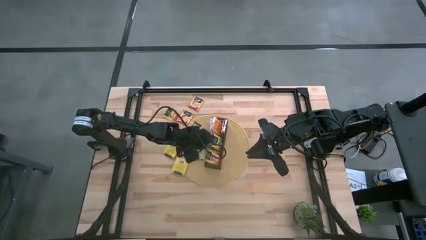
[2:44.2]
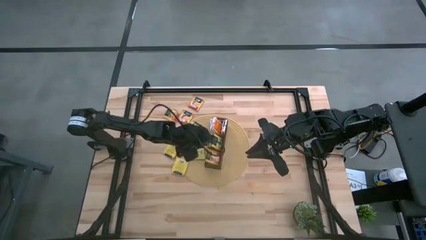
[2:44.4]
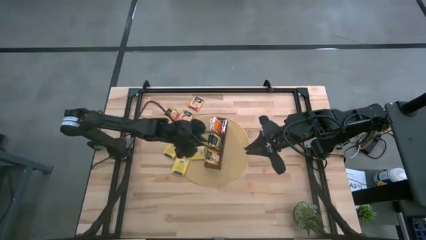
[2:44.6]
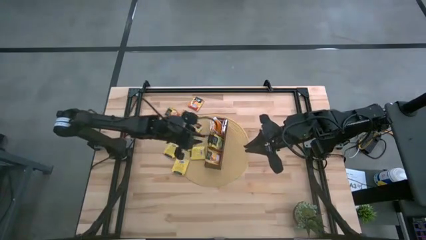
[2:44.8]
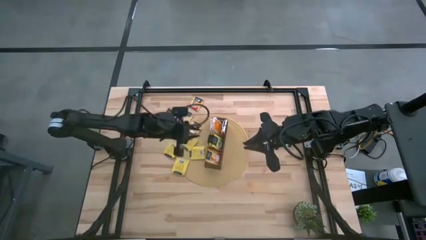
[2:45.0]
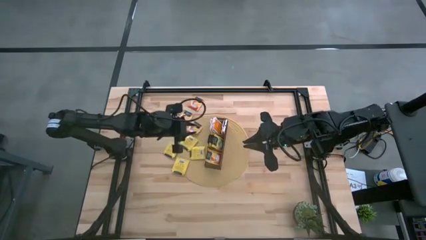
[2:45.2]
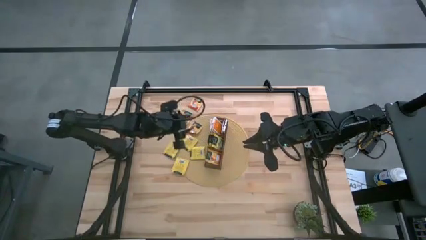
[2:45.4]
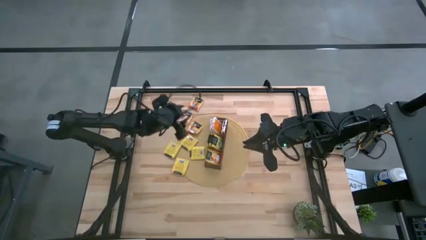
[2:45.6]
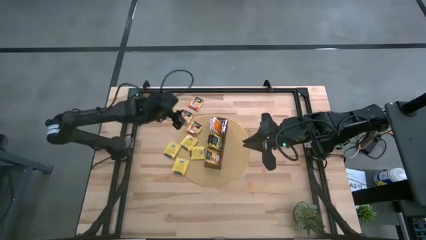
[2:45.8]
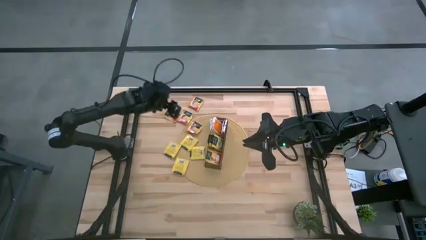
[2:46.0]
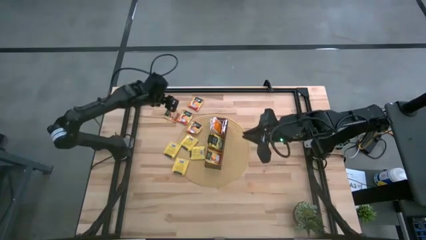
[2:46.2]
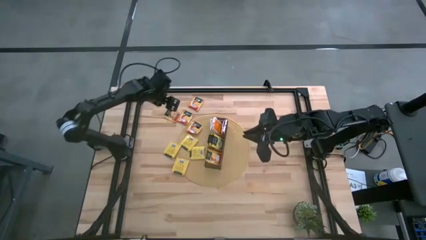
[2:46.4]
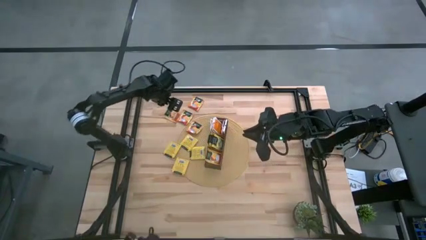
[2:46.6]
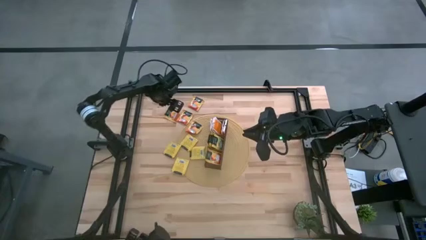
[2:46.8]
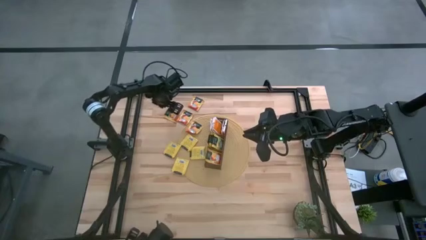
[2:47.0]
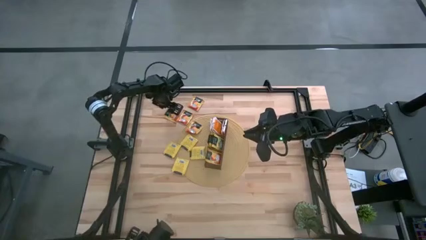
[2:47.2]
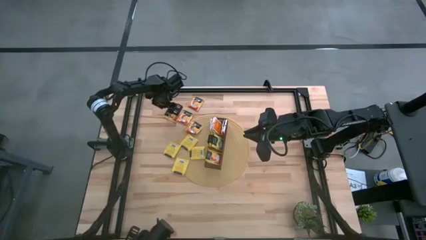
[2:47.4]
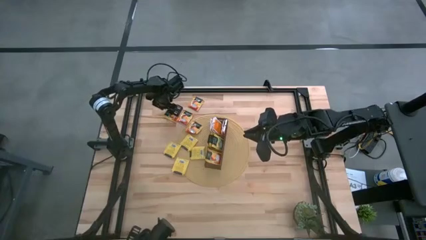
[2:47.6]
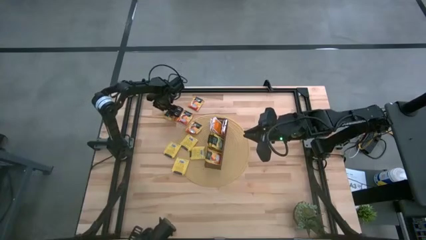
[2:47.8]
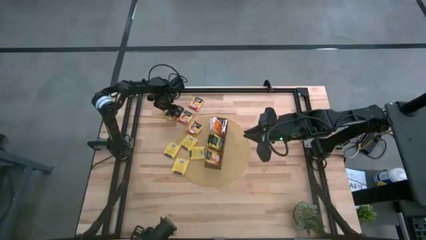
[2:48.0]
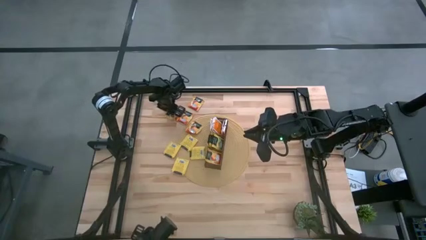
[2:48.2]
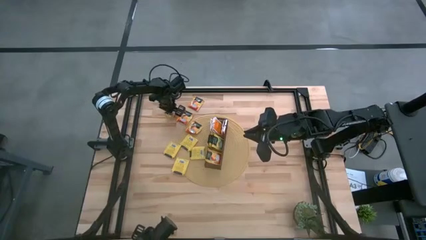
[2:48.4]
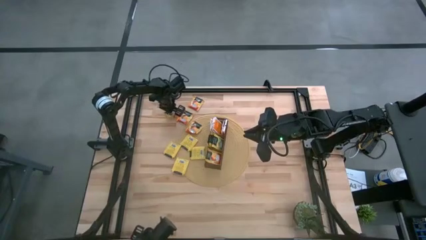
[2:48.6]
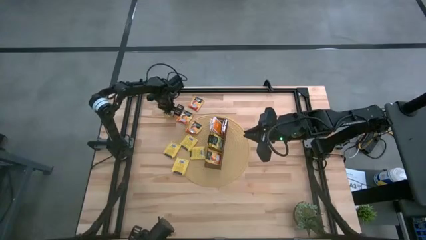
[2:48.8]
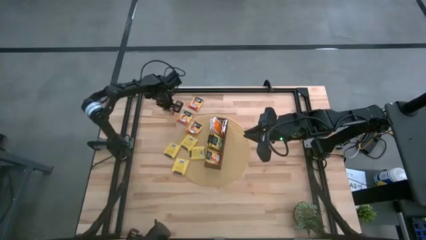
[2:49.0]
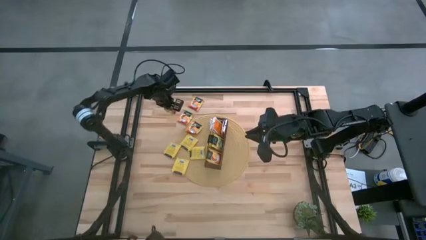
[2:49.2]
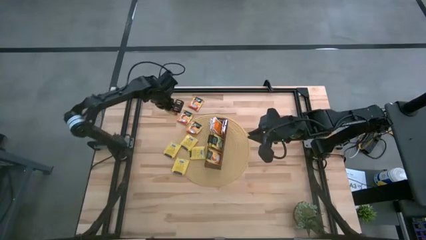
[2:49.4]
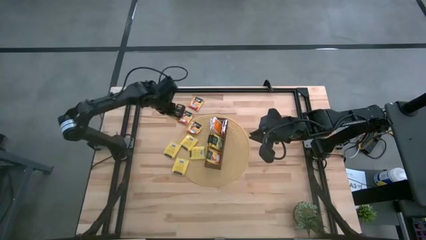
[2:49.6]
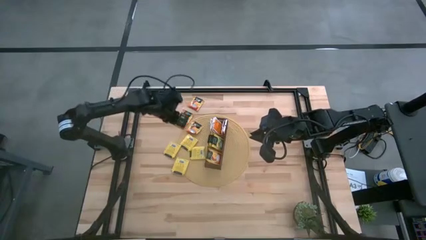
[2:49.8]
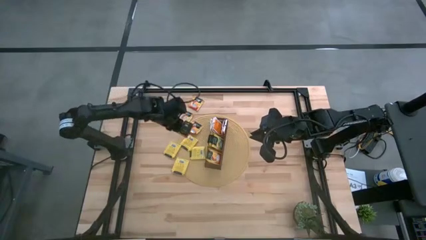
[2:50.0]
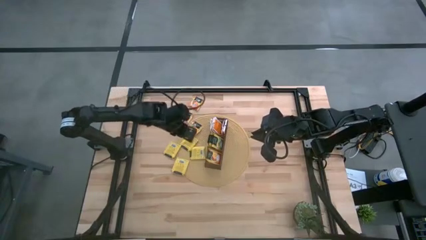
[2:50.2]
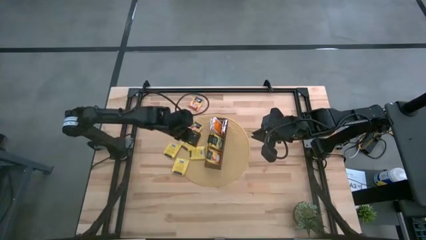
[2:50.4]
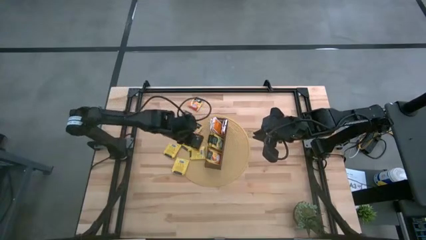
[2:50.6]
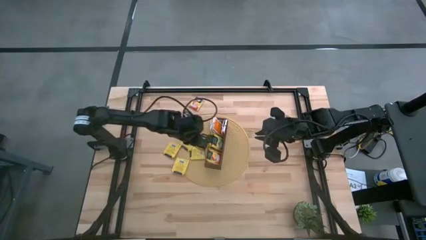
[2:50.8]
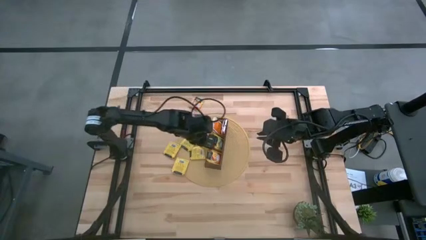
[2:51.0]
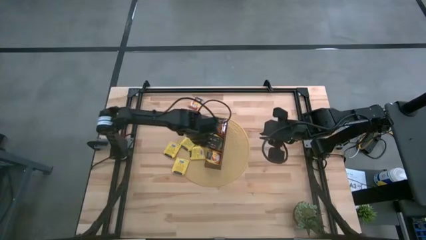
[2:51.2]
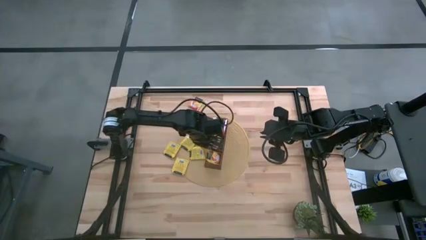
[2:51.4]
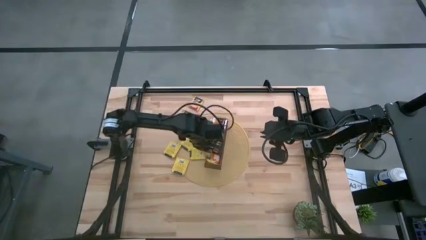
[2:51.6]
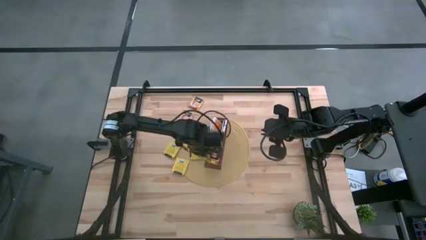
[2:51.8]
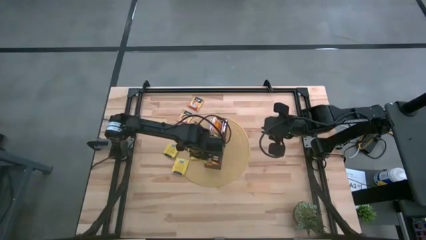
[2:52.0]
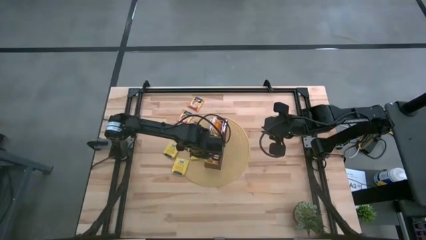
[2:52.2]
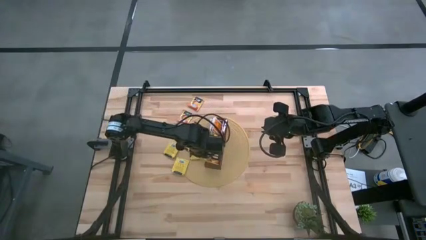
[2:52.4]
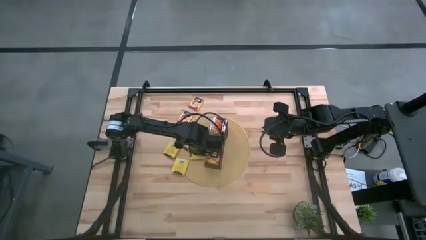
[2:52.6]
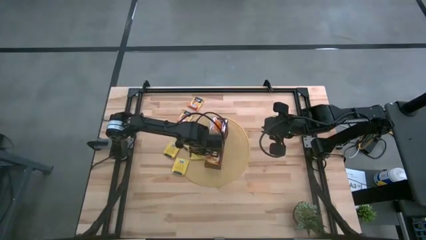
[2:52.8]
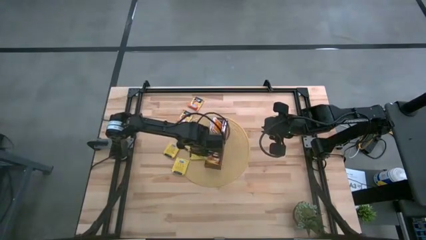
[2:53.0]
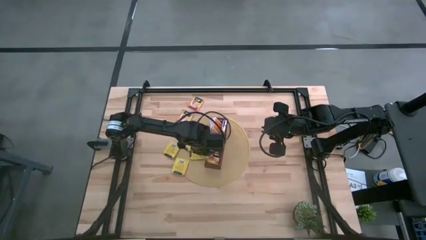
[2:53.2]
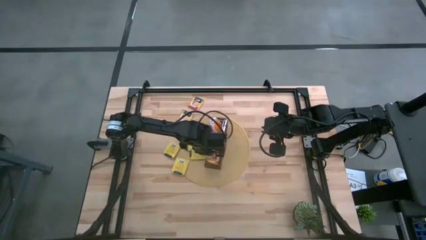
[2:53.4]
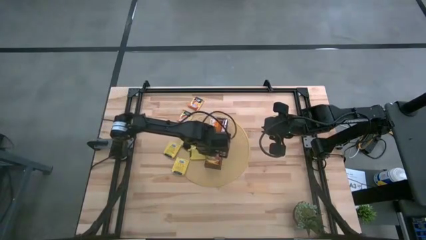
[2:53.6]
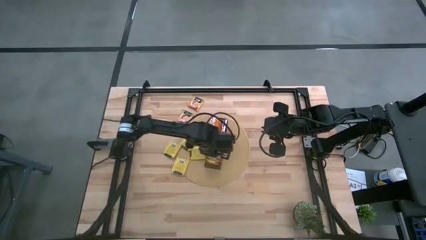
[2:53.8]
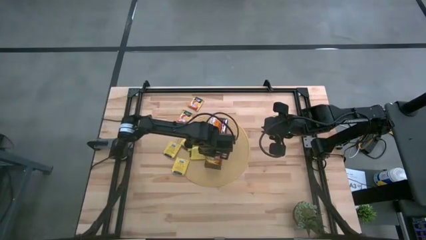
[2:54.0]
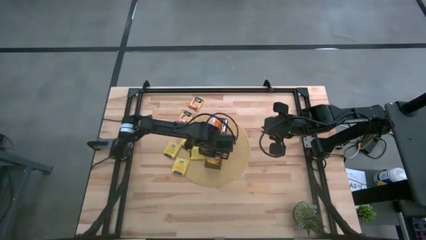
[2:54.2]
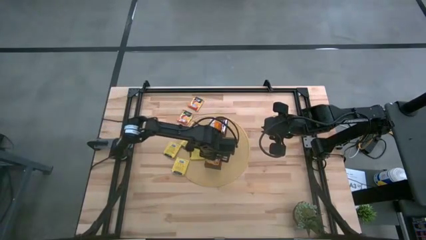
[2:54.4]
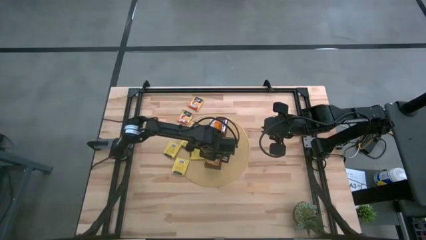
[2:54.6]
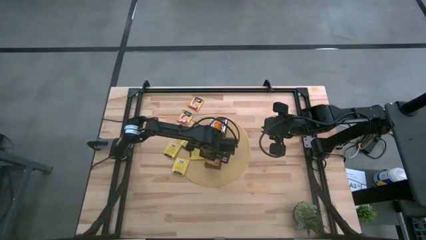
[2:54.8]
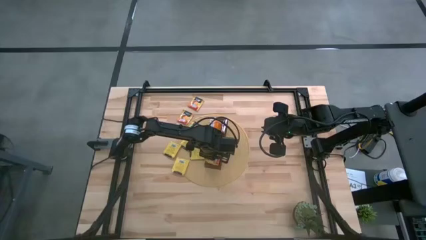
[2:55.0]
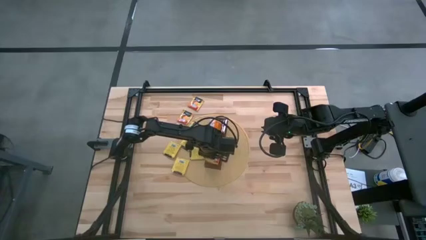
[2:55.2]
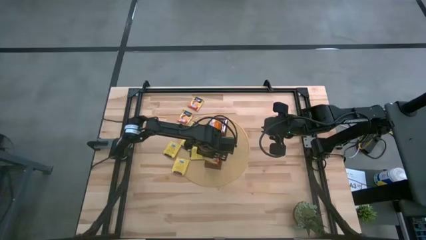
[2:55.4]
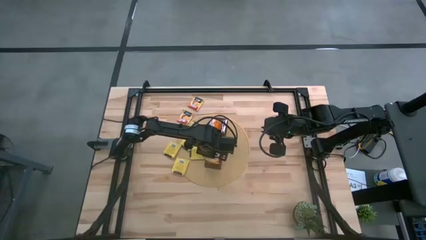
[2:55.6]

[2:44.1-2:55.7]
Task: Pick & Place Tea
Put the orange tea bag into the bottom section of the wooden organizer

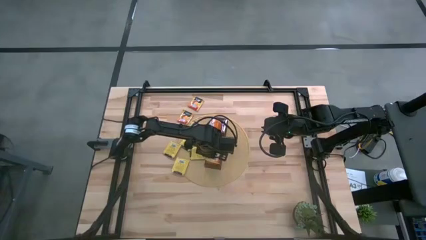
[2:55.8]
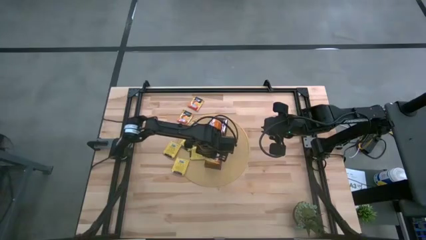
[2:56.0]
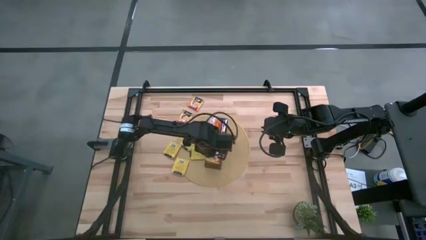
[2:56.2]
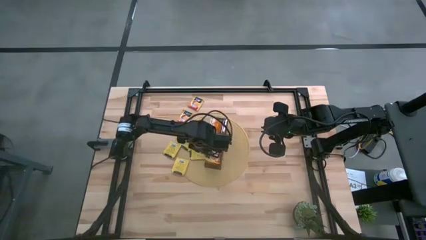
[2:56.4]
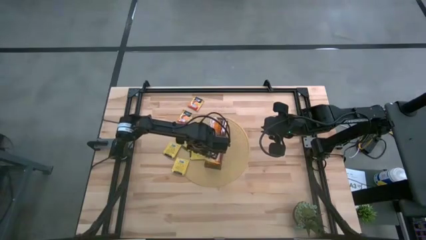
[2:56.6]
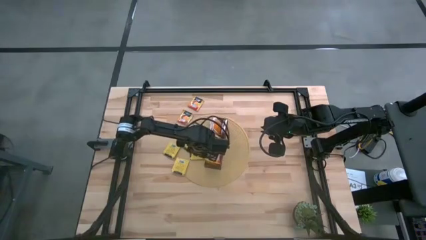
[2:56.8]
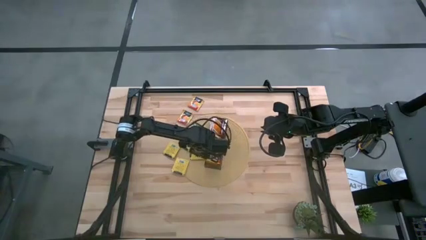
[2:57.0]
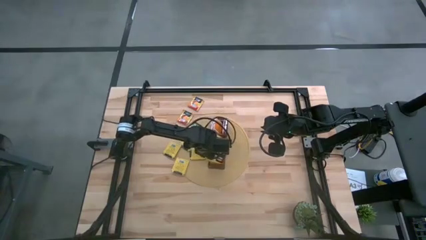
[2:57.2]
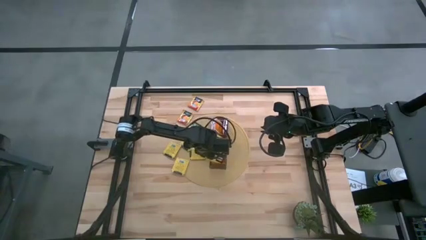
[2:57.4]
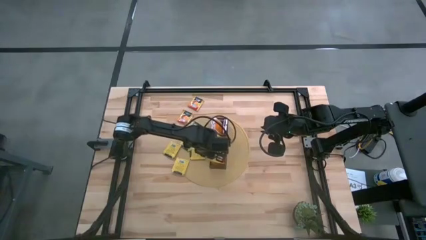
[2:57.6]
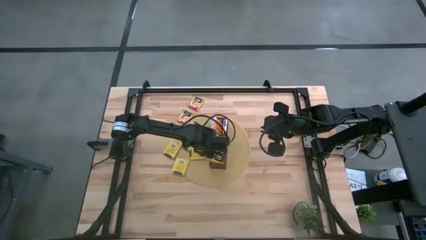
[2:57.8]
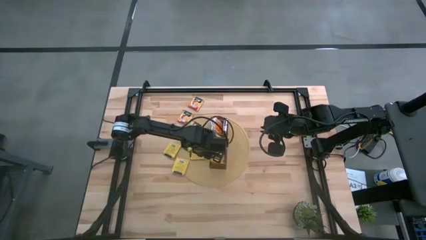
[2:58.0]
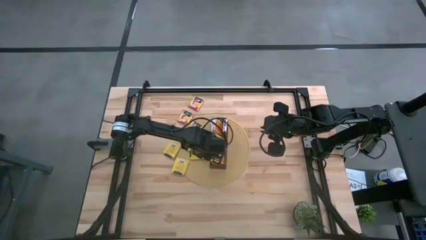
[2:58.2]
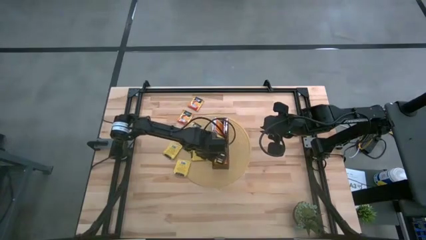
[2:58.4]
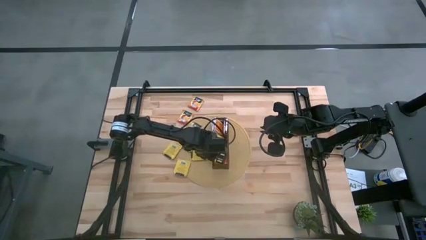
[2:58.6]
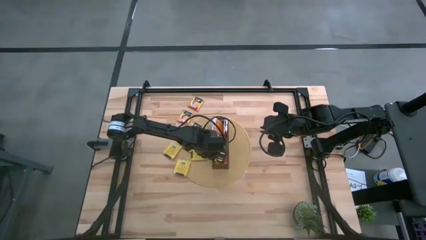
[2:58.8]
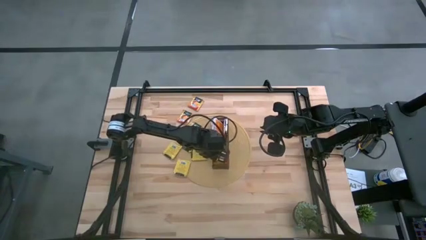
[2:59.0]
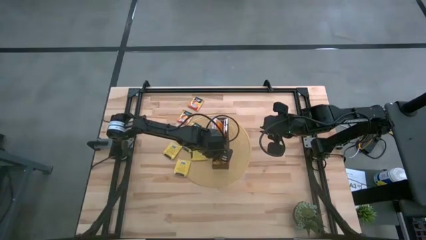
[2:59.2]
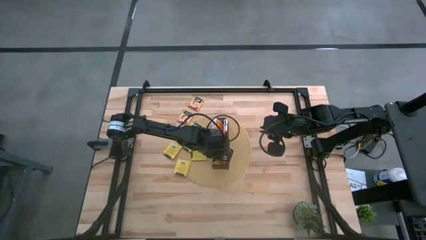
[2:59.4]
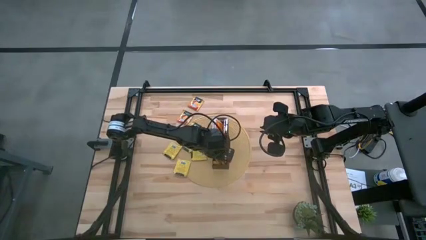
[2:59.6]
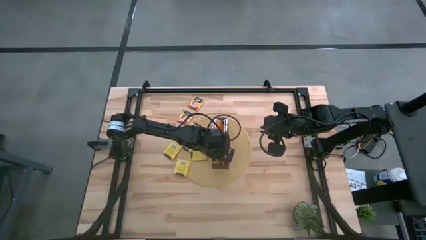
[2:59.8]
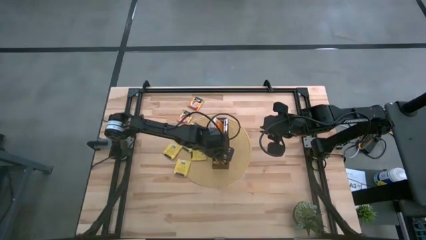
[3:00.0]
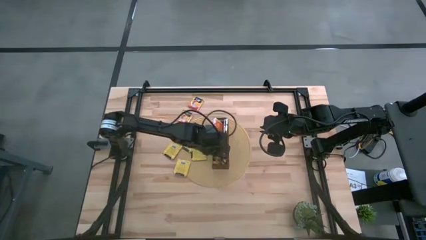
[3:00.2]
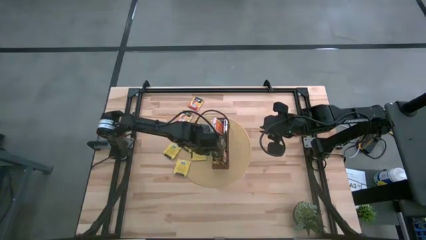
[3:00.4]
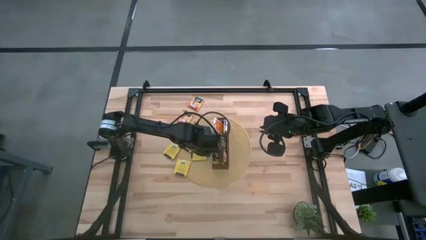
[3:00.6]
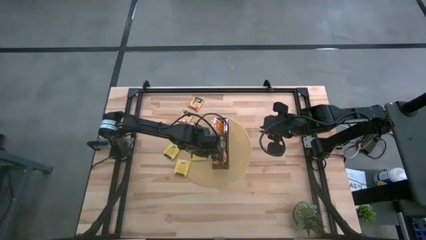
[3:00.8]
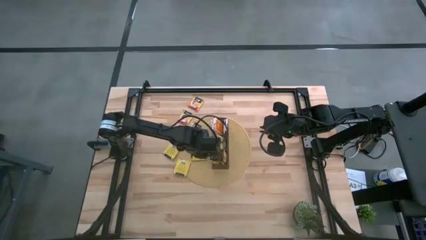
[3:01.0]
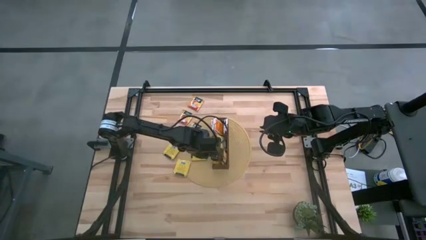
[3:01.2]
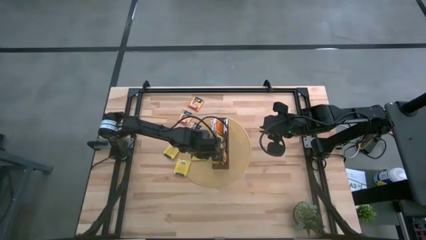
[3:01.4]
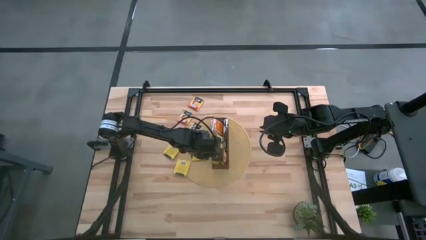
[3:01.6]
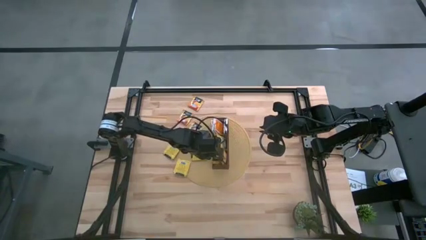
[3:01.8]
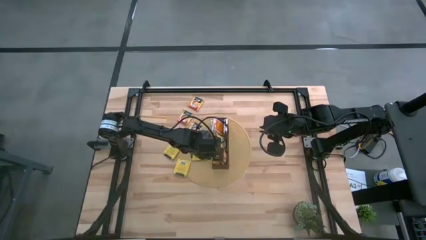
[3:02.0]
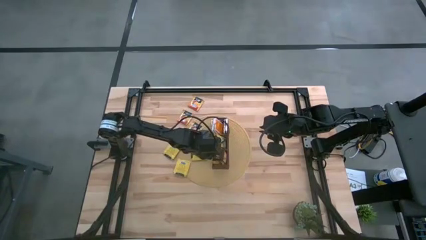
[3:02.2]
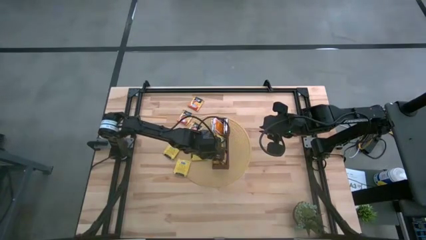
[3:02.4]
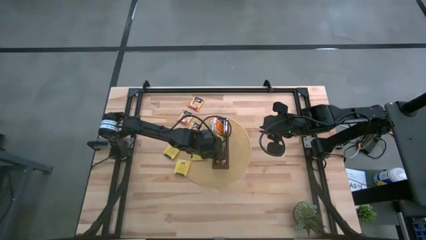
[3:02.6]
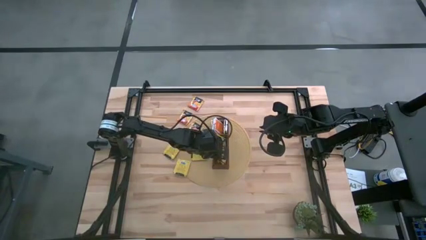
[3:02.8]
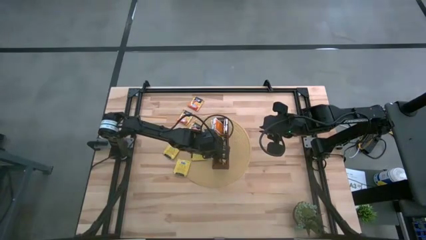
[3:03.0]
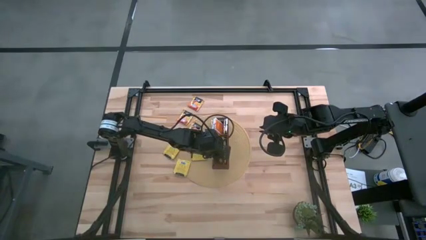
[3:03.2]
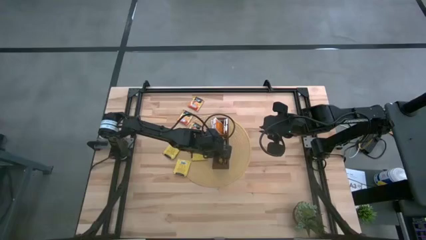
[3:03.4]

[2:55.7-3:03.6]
Adjust the orange tea bags in the wooden organizer
